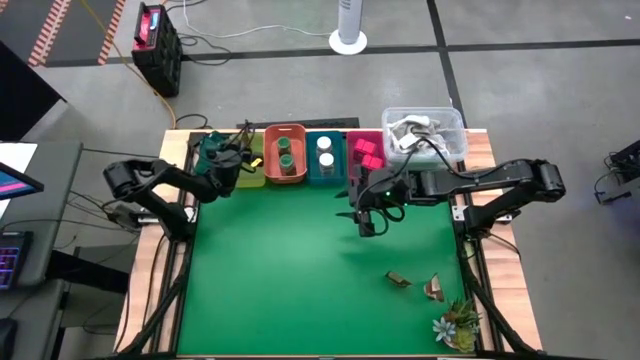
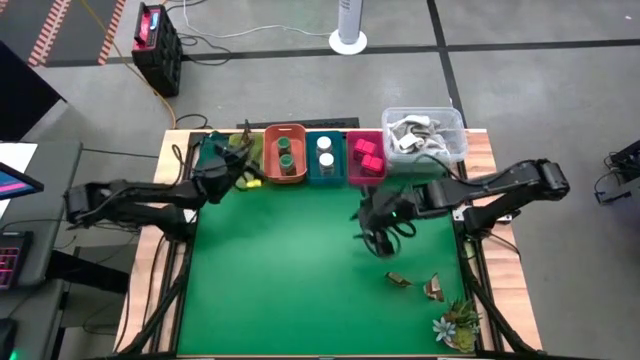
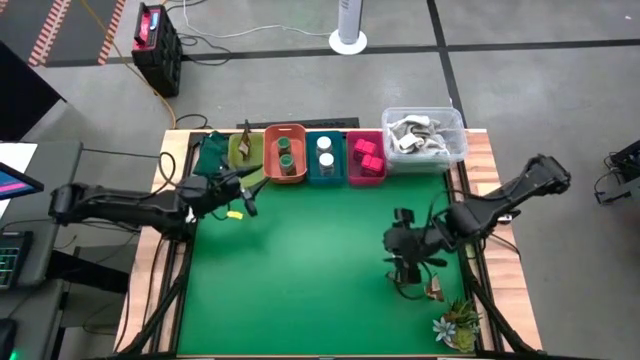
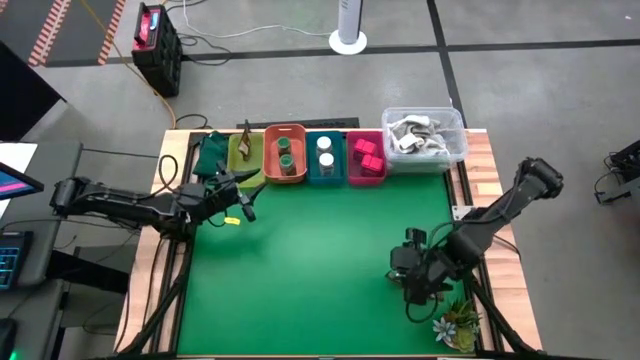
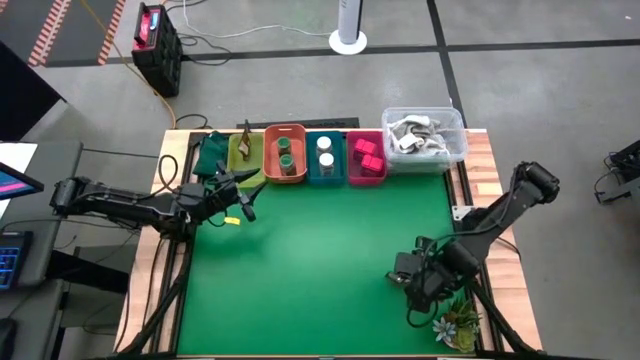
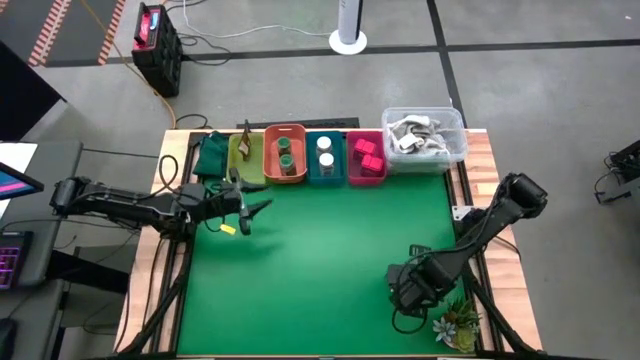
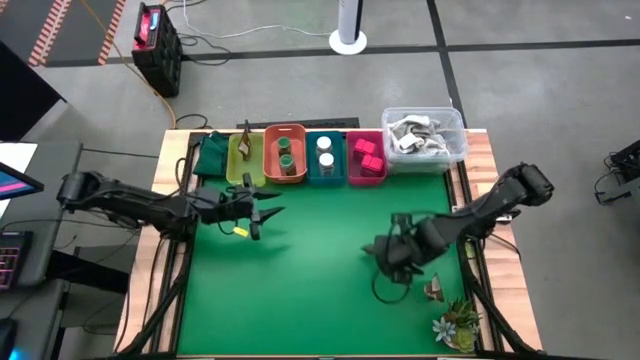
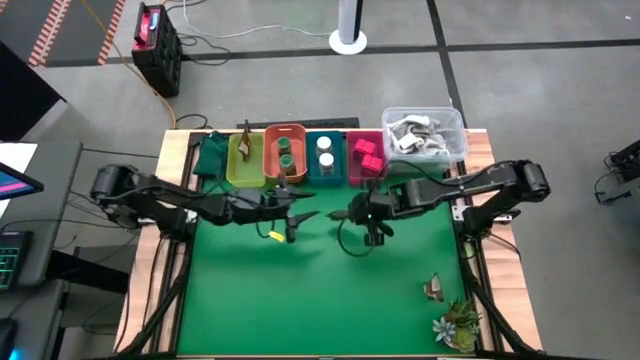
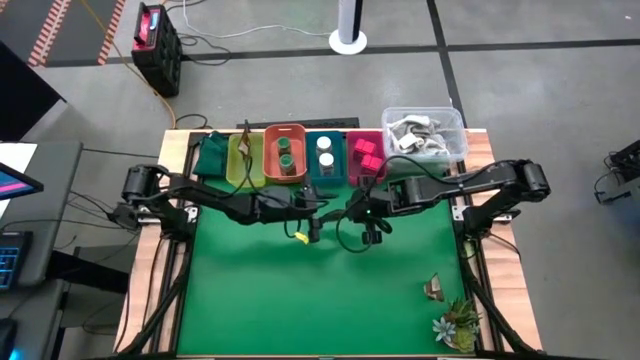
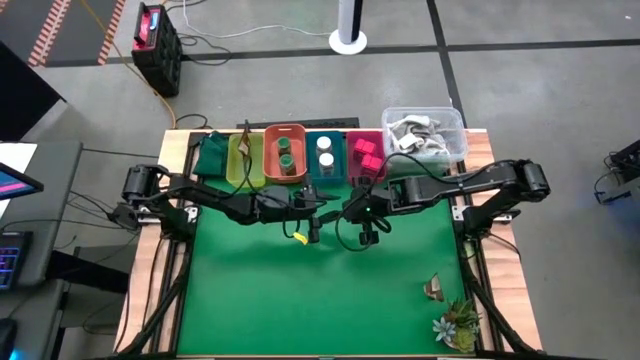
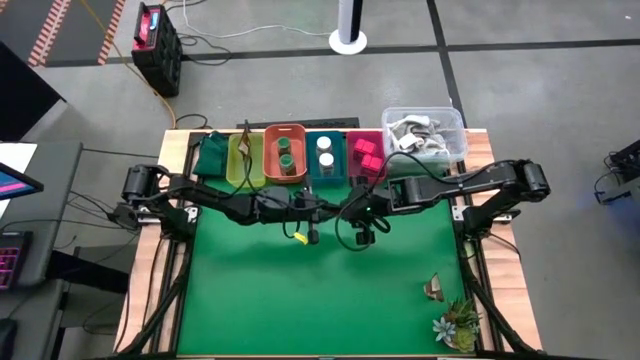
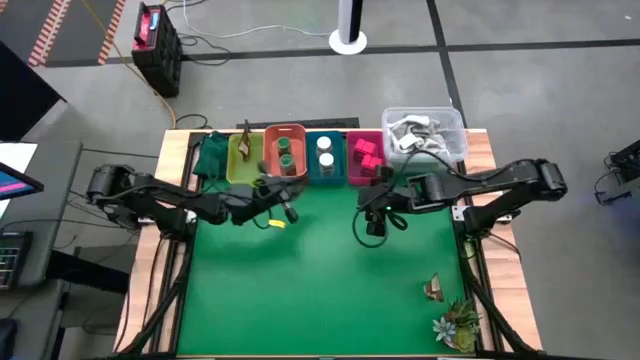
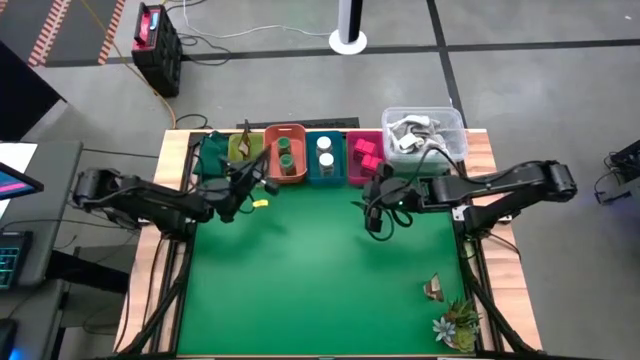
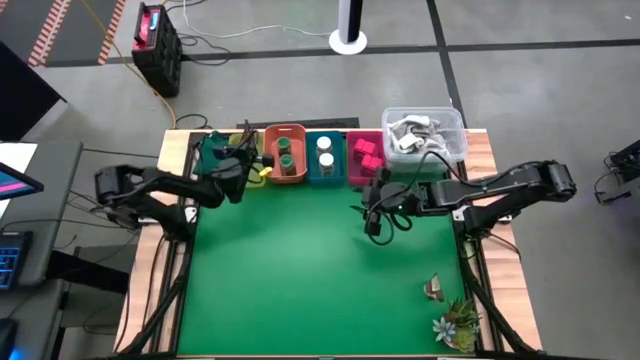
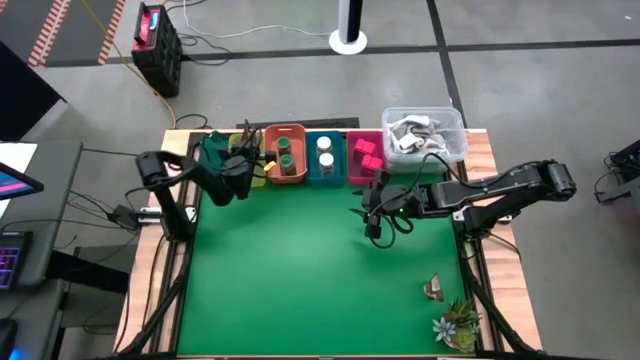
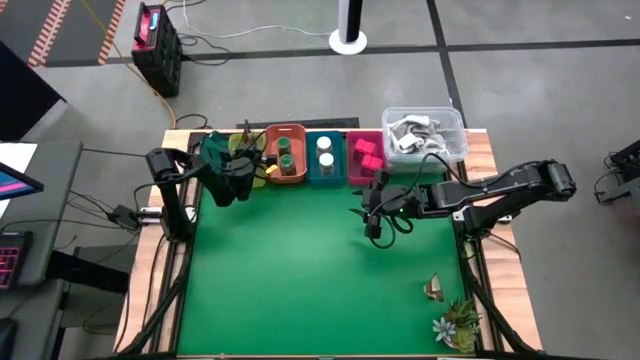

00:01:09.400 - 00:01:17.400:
Task: Sort spices by type
Put the left orange spice pack into the yellow bin

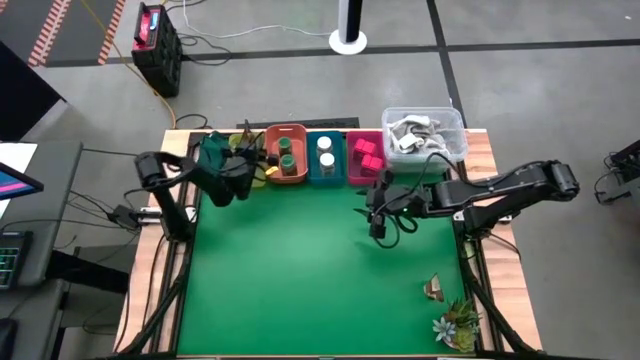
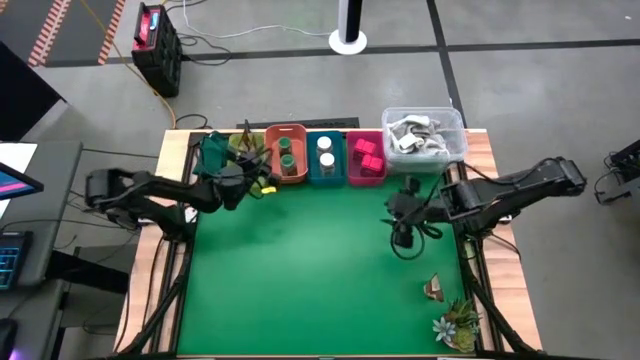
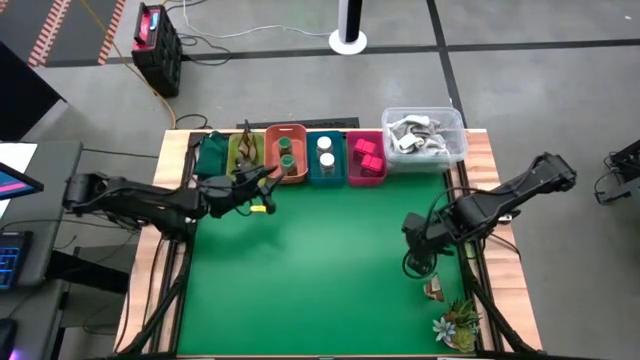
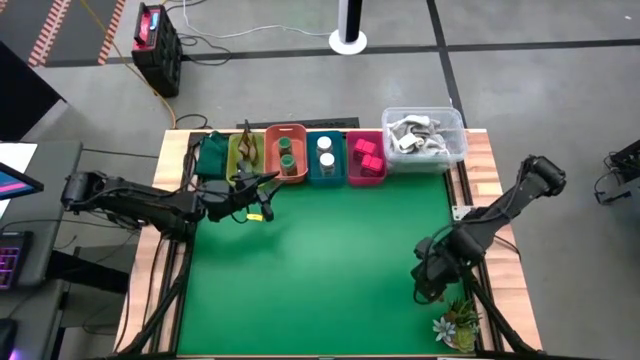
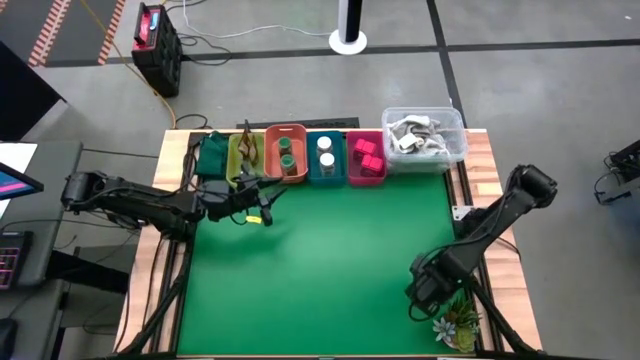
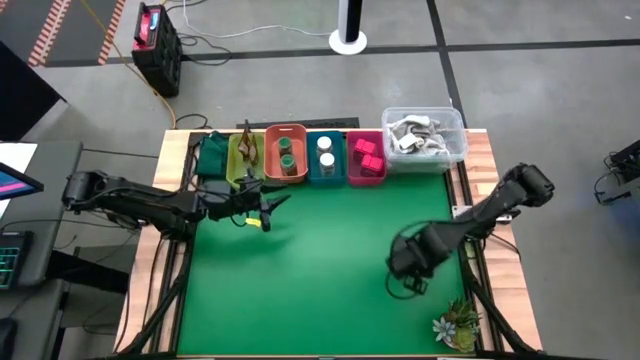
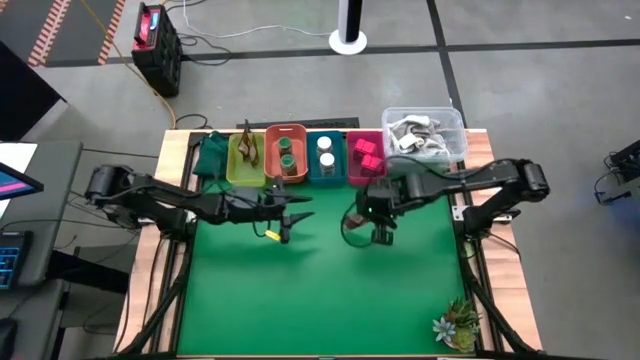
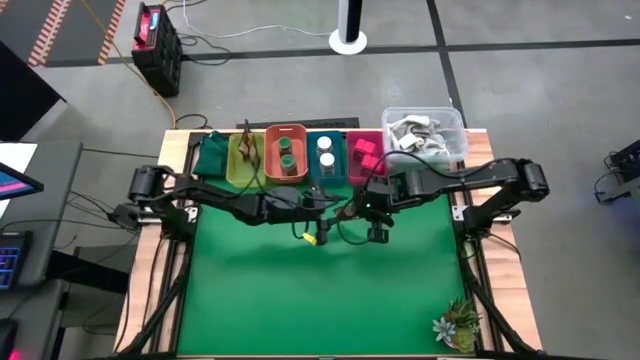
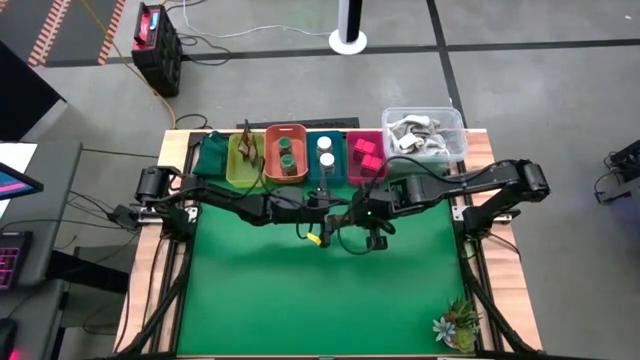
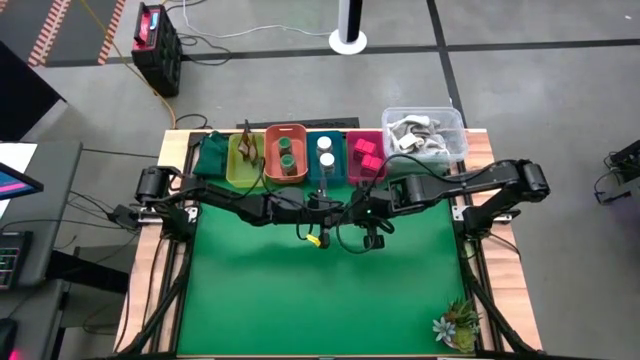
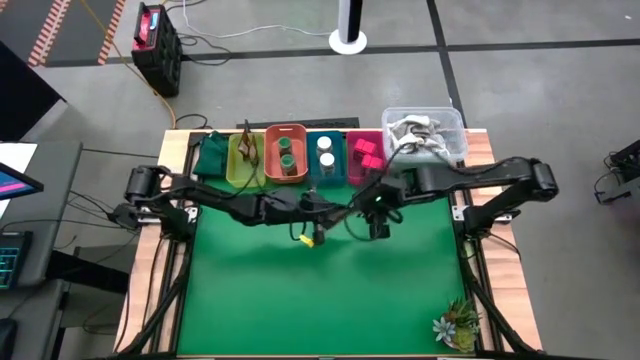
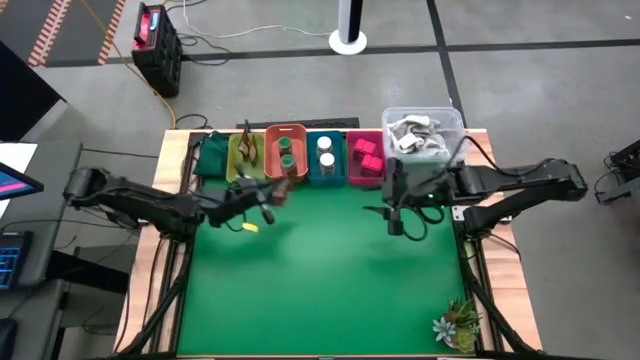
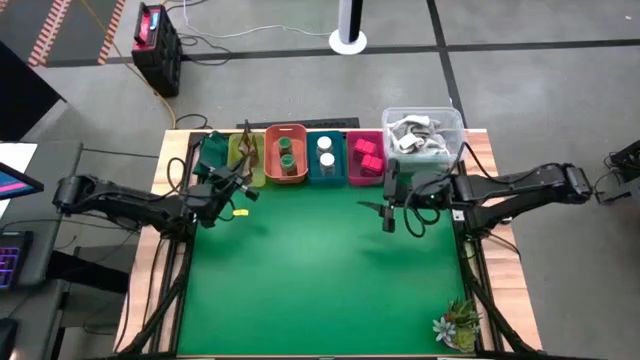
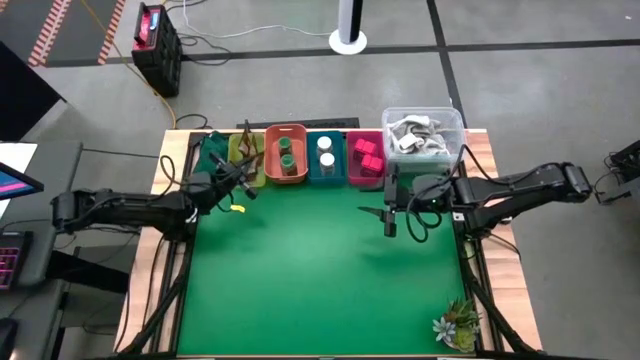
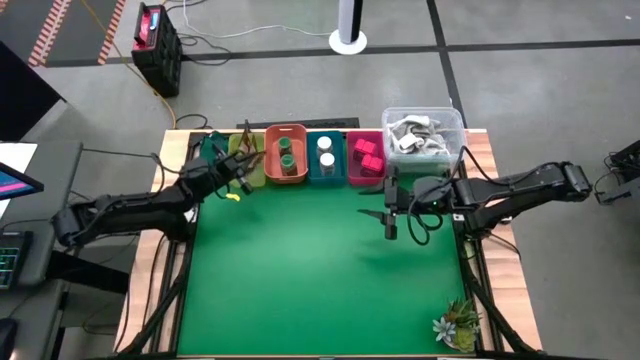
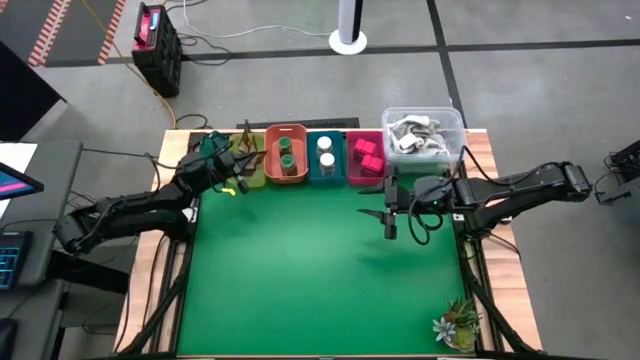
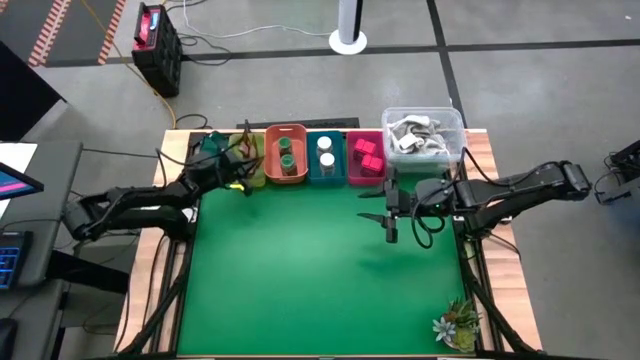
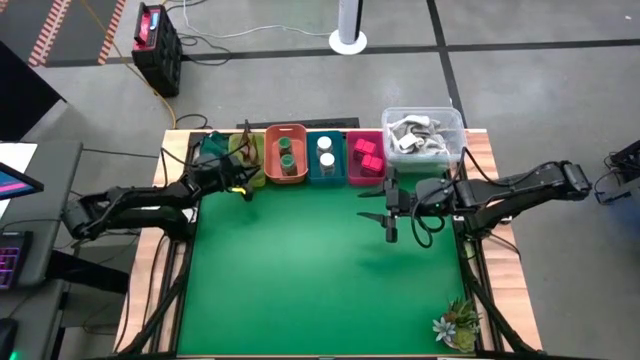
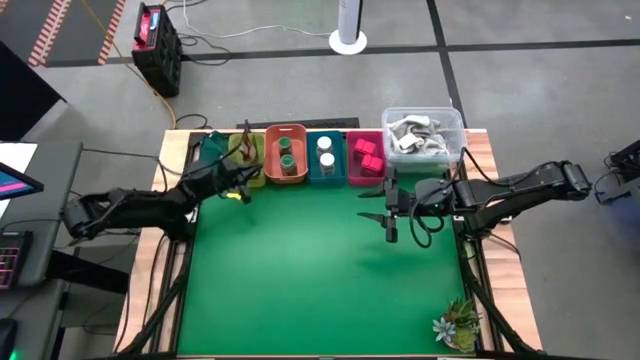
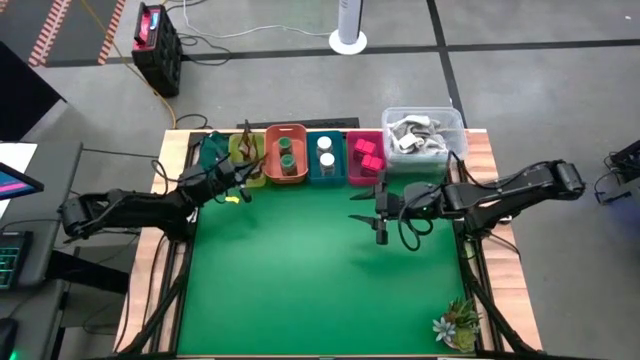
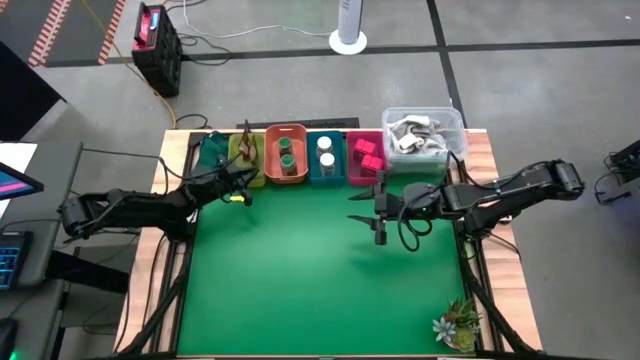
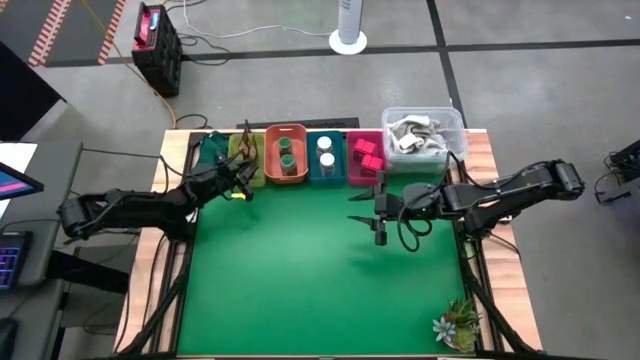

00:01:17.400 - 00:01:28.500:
Put the orange spice pack into the yellow bin

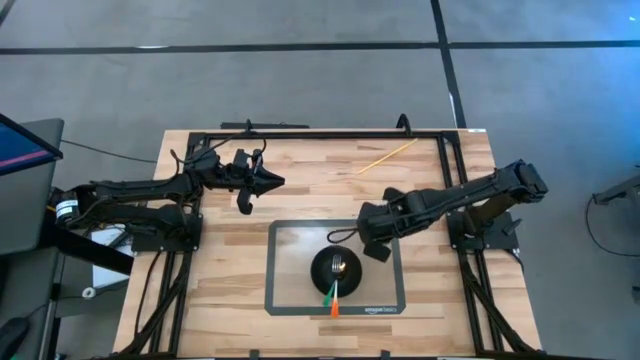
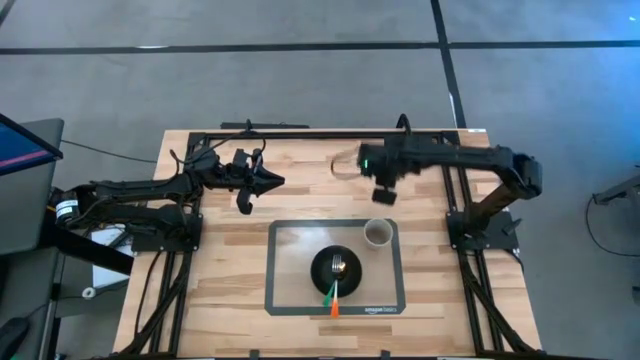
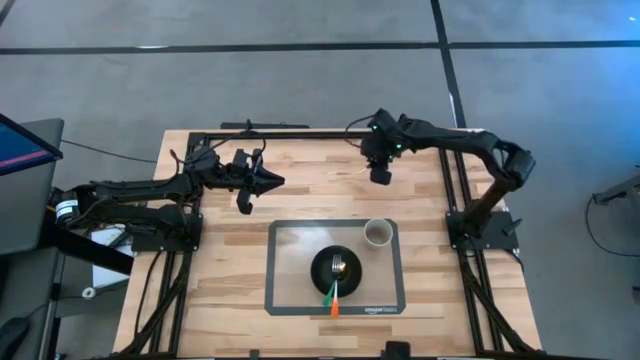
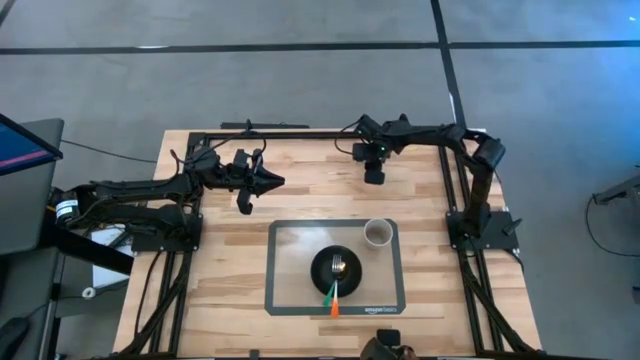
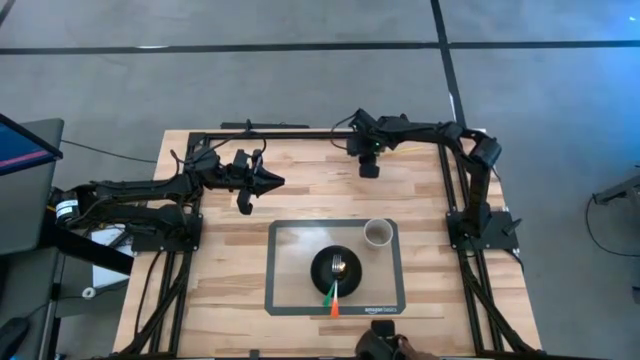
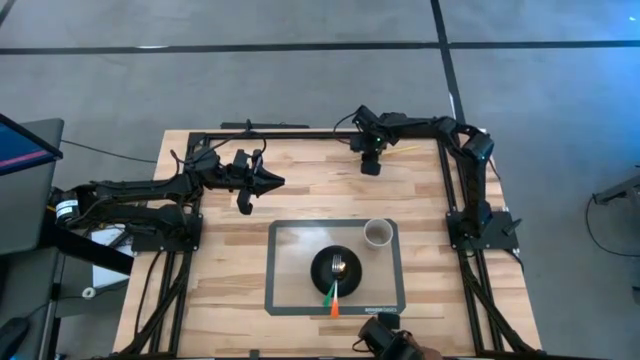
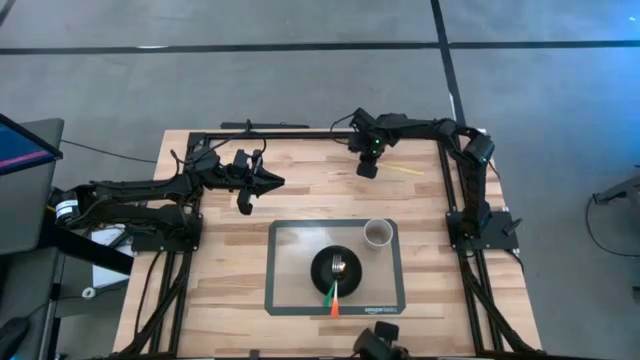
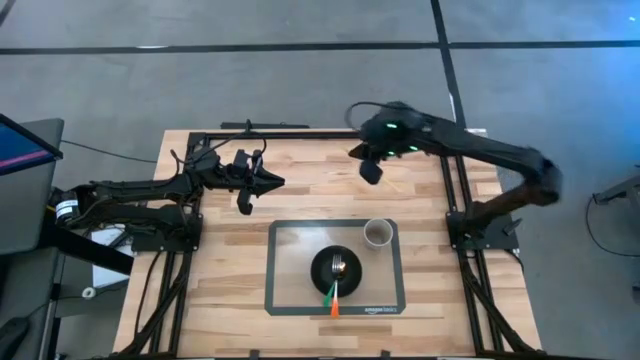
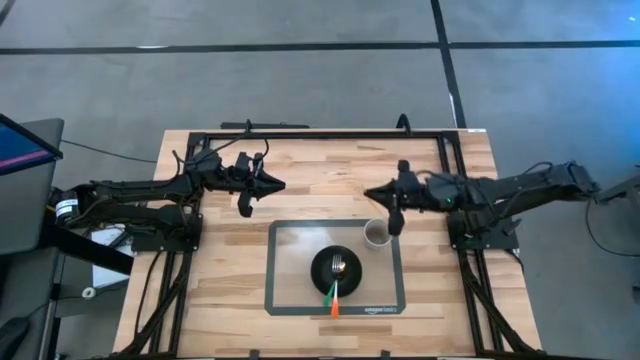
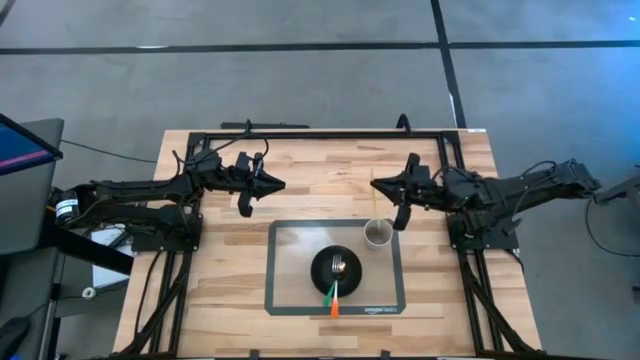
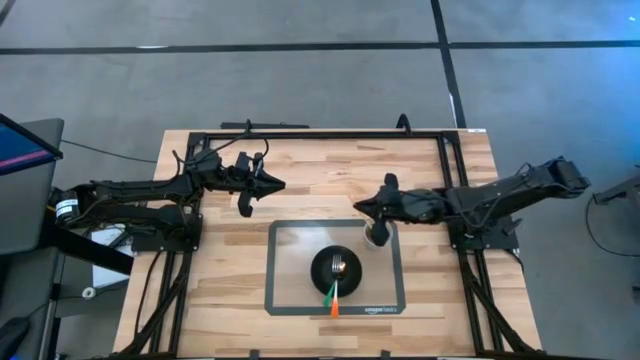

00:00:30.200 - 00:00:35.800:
Task: Pick & Place Utensil
Put the yellow straw into the white cup on the transparent mat
